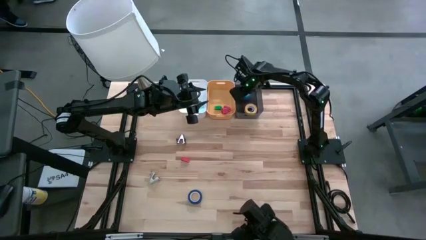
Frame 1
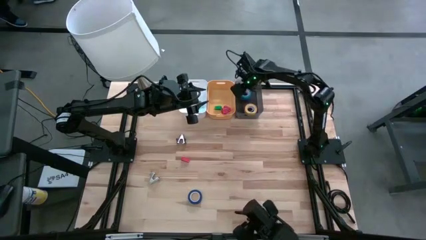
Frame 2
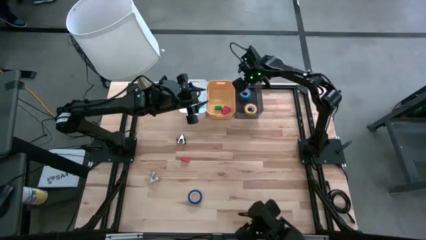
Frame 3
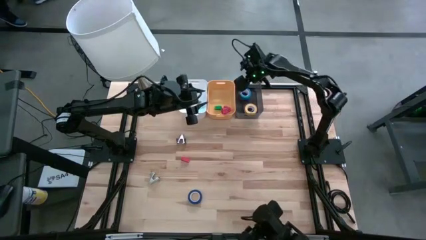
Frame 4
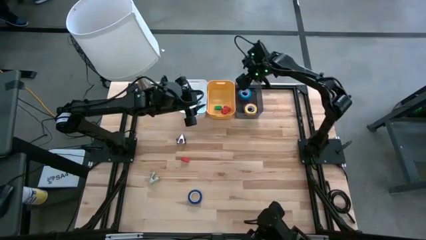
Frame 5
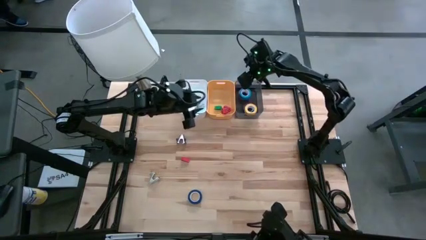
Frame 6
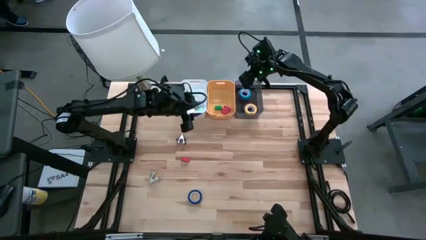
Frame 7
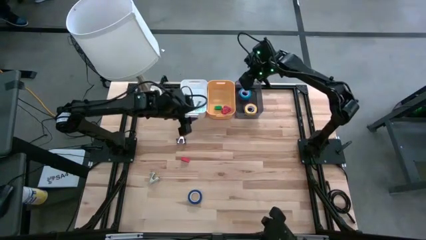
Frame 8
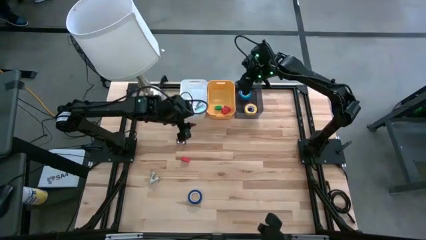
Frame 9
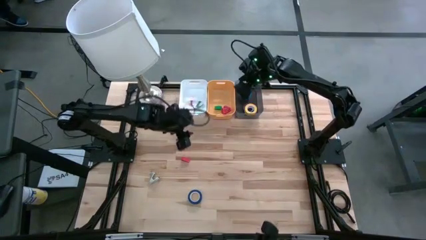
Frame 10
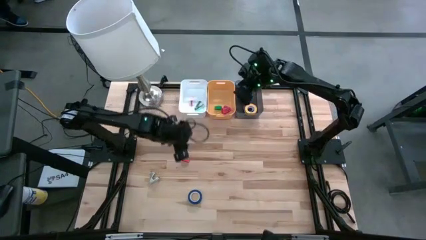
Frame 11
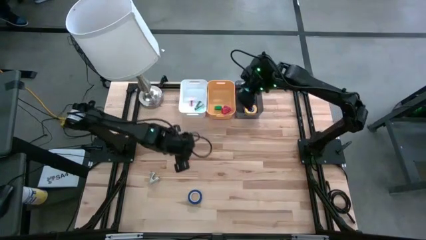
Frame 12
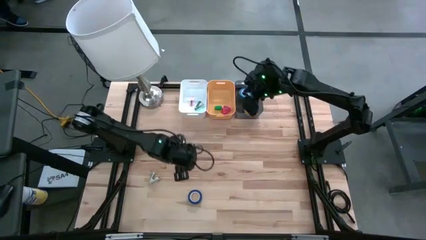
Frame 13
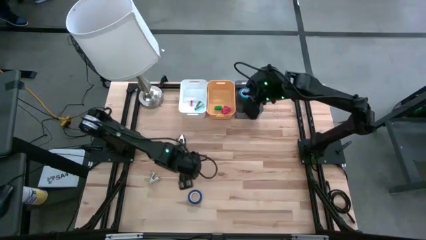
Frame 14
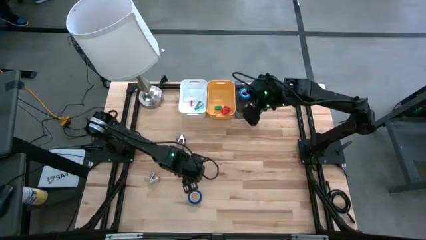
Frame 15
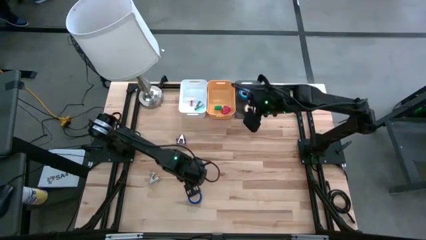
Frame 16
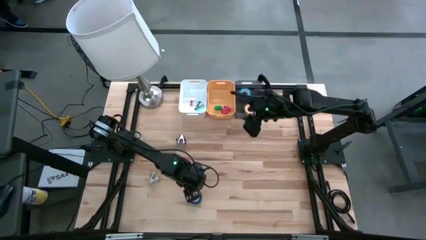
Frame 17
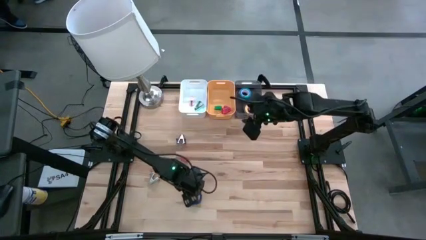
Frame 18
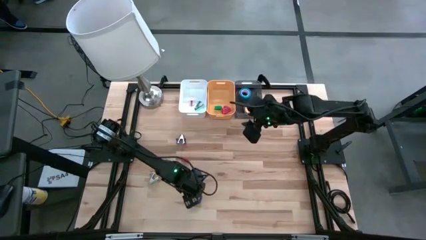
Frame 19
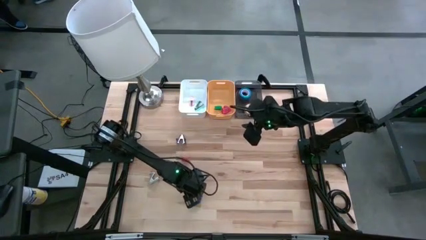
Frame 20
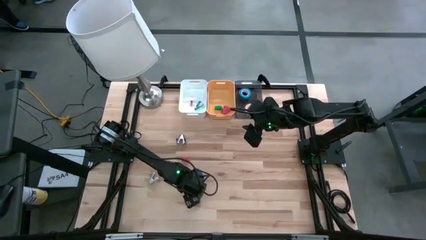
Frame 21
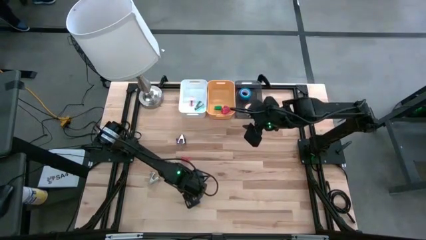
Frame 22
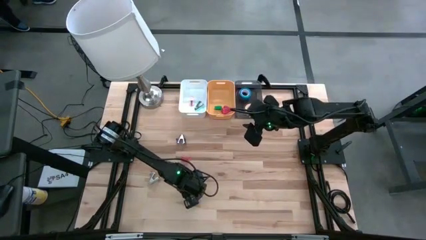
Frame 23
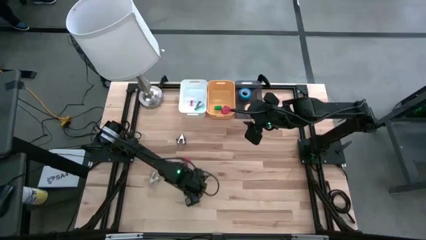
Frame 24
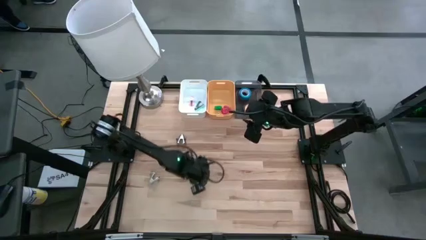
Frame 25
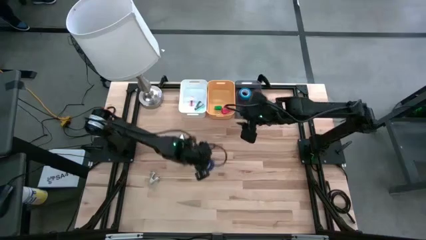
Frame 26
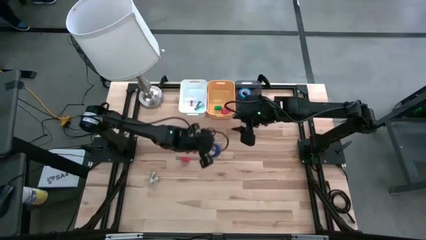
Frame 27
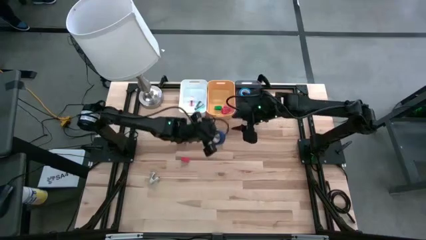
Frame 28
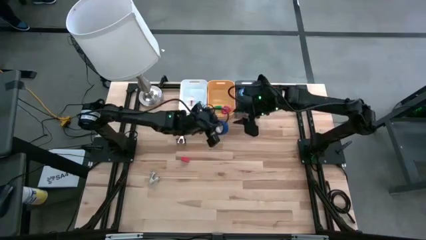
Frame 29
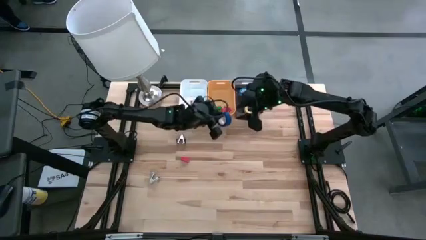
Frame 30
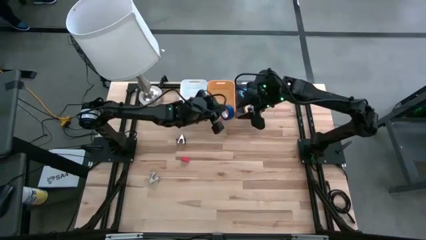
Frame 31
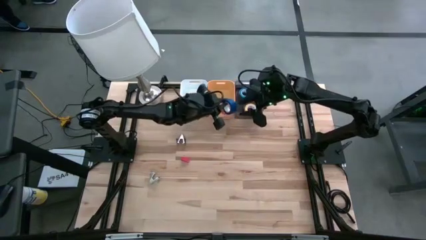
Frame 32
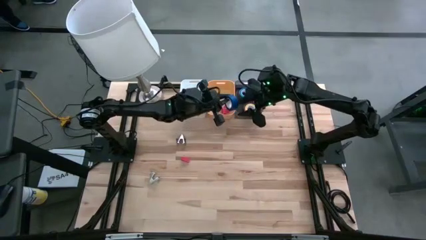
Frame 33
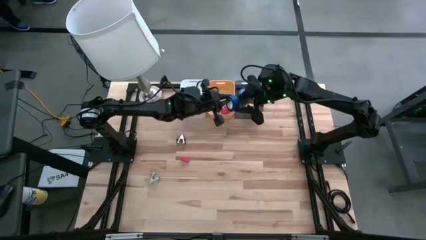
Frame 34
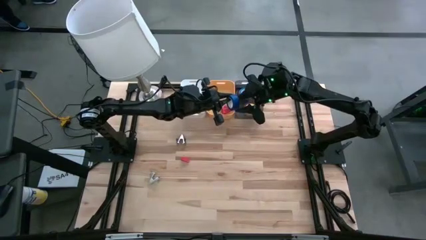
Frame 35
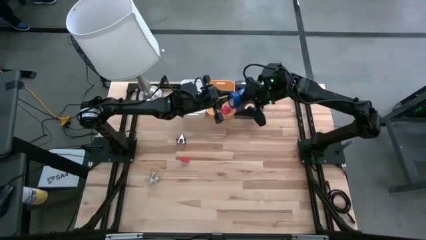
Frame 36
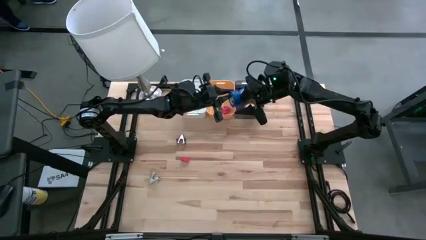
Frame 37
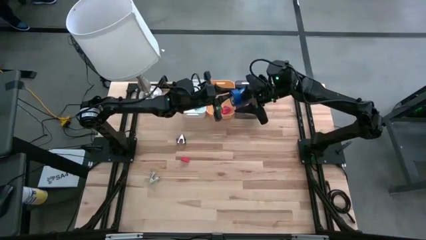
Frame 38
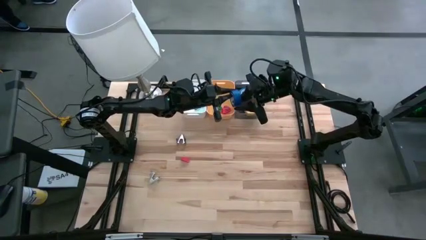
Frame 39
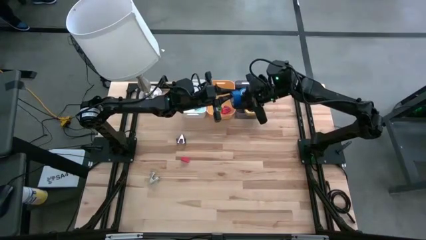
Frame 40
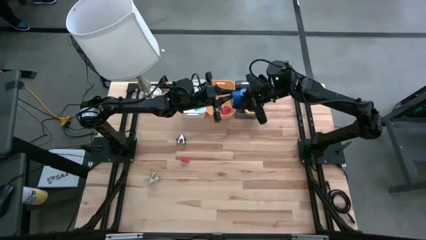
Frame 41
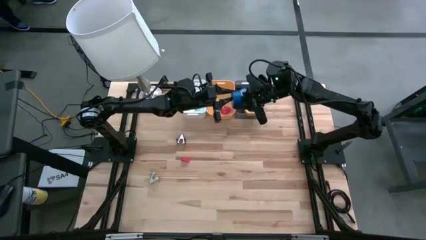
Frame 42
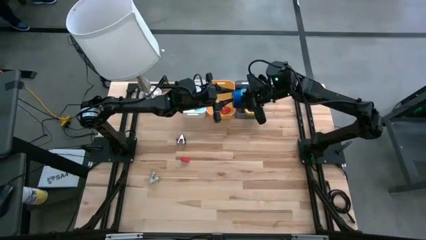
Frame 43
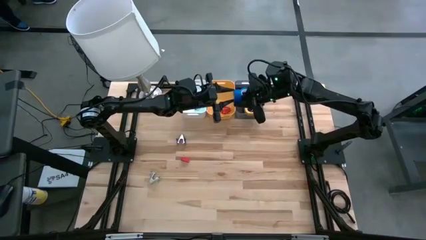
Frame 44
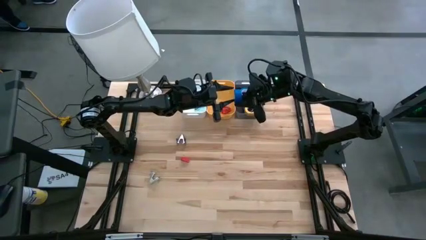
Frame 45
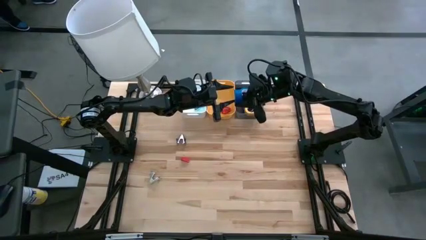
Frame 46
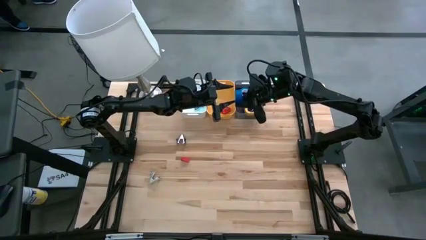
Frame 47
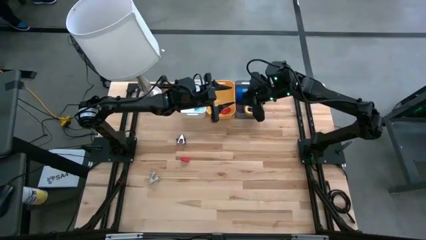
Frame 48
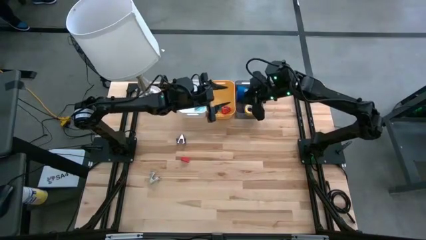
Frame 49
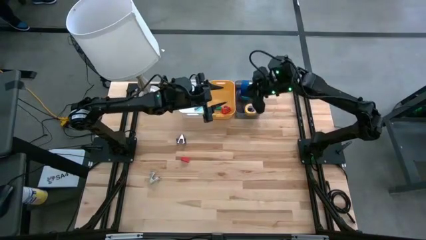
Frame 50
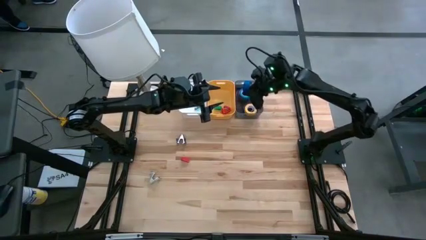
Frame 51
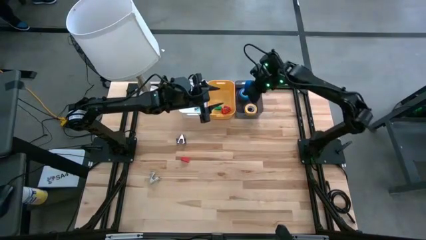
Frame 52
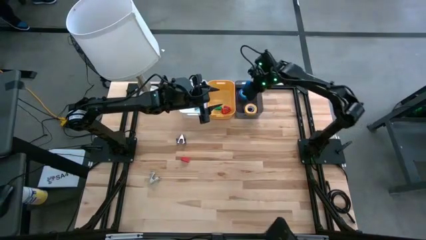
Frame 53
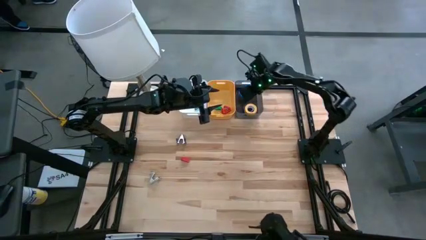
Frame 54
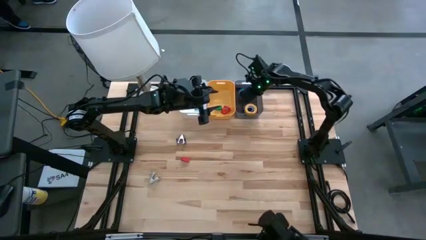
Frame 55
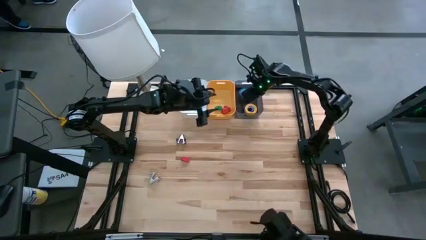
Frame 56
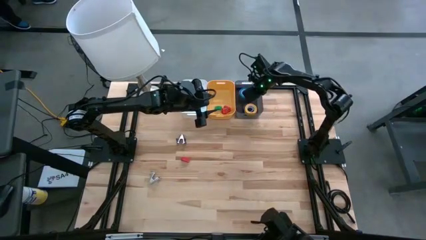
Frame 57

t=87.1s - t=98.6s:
Task: Pick and place Stapler, Stapler remover, tape
Put the blue tape into the black bin
